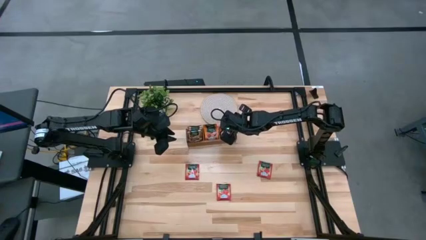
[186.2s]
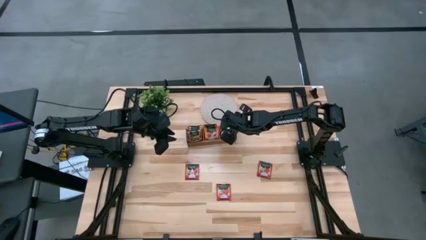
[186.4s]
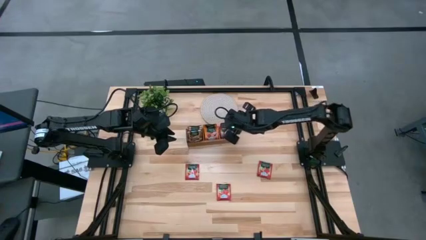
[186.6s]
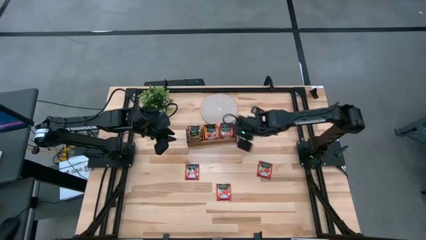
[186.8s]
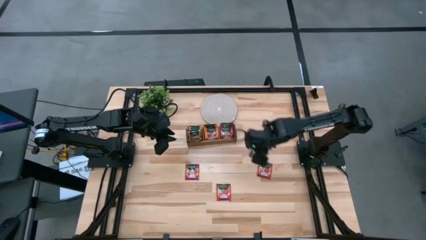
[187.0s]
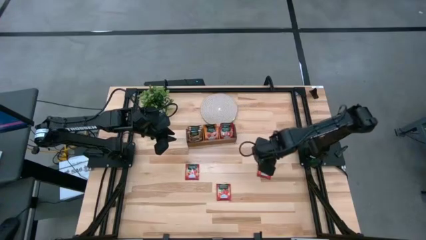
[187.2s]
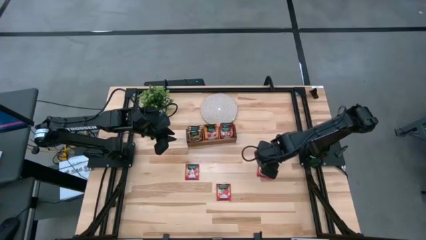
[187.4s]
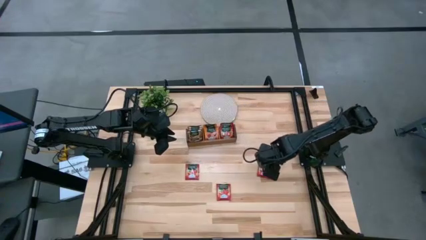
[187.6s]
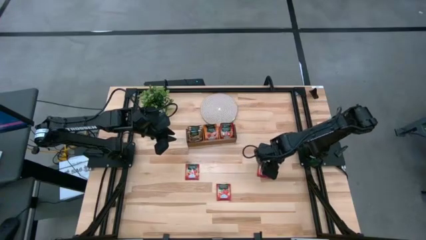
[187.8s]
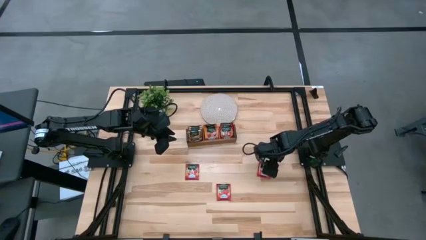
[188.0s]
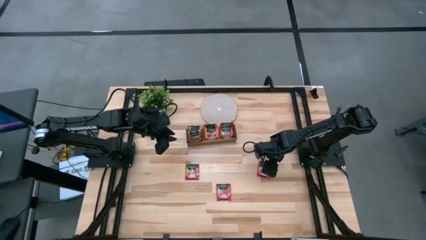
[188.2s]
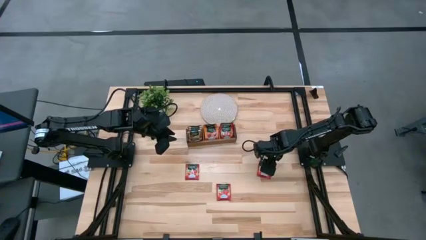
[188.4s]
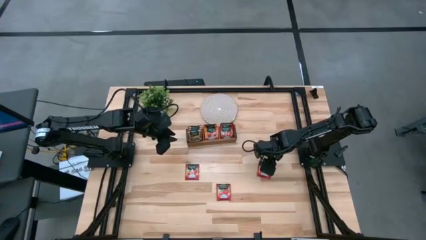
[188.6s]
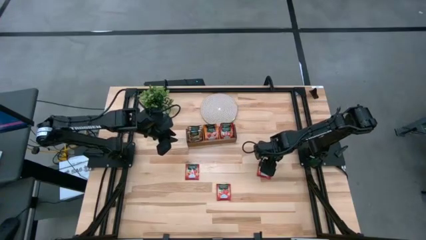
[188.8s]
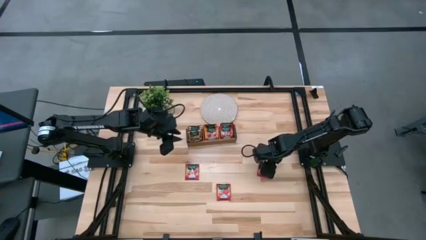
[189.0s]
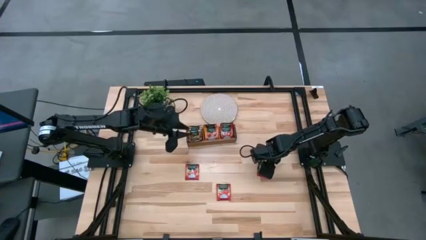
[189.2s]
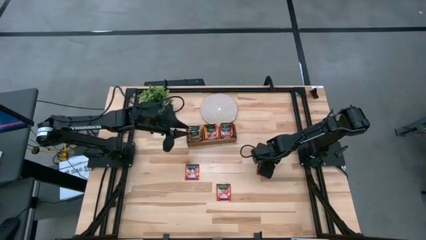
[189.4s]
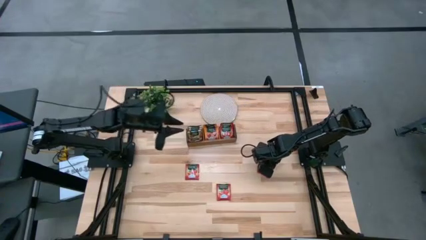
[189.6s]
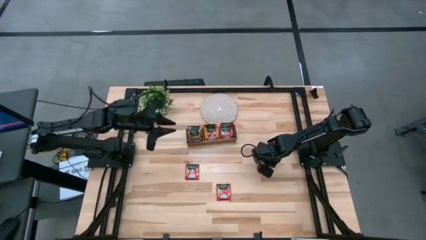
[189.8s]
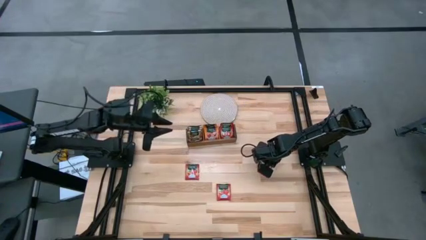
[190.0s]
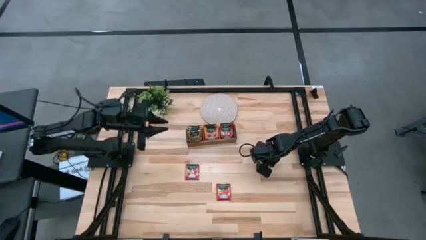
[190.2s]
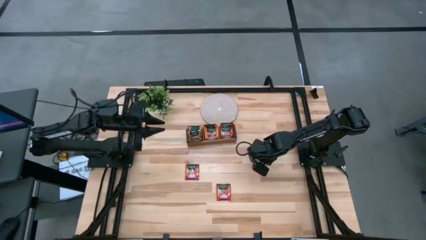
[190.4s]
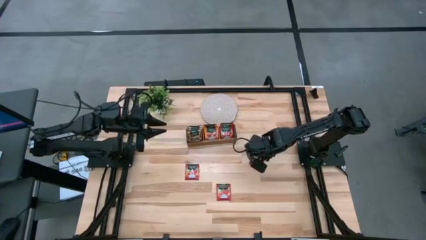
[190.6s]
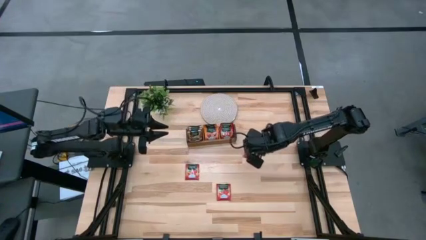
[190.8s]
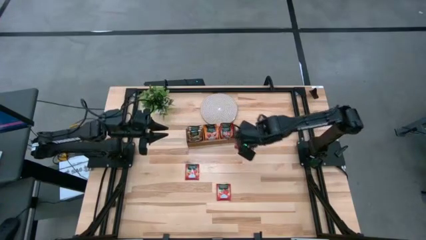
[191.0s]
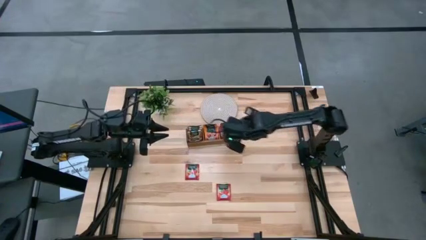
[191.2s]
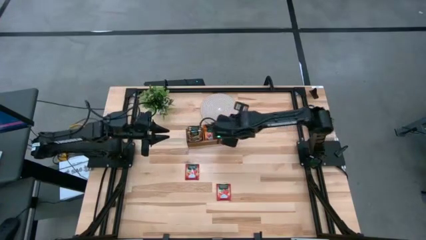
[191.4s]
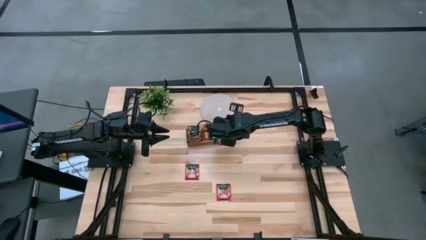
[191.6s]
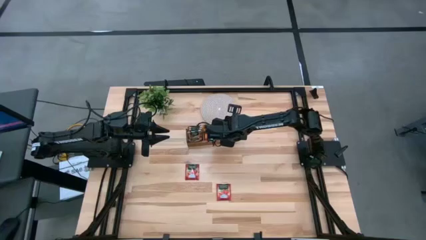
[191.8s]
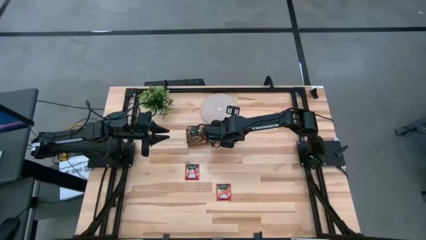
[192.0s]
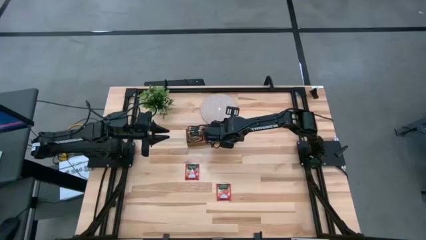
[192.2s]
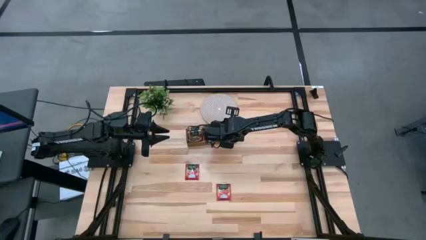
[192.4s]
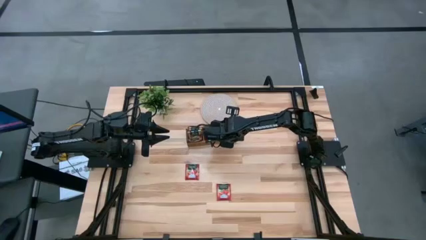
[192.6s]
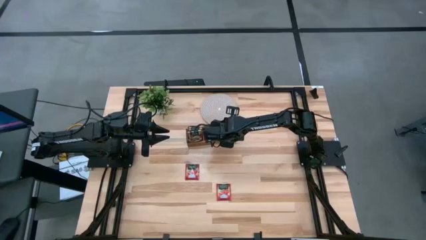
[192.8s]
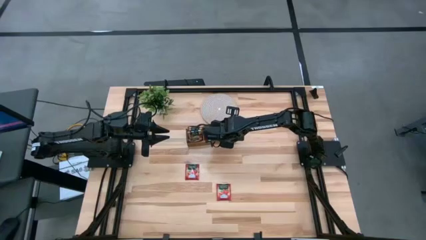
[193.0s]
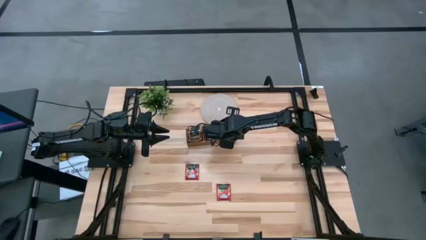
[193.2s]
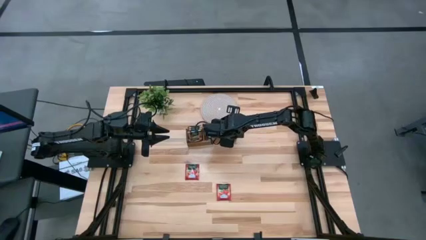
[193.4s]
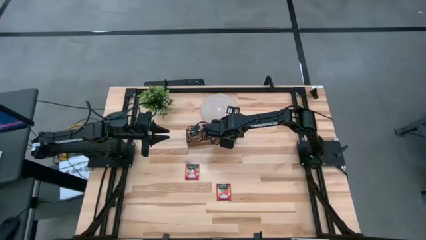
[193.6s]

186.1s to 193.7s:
Task: Pick & Place Tea
Put the red tea bag into the right section of the wooden organizer

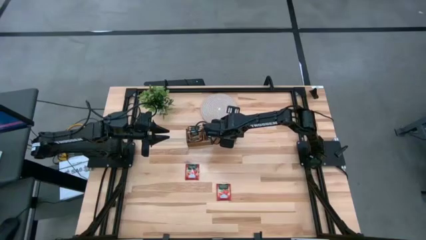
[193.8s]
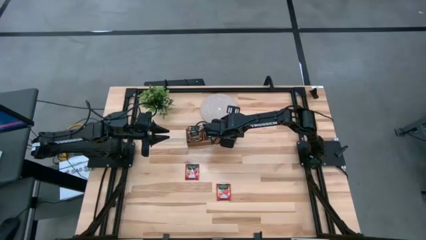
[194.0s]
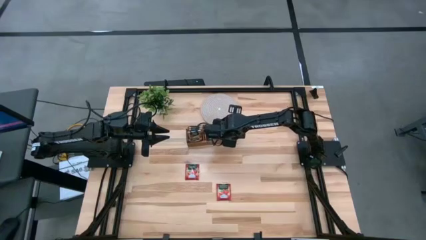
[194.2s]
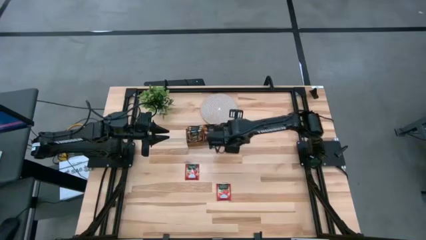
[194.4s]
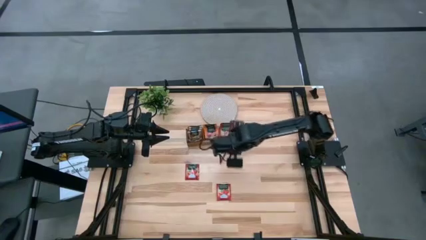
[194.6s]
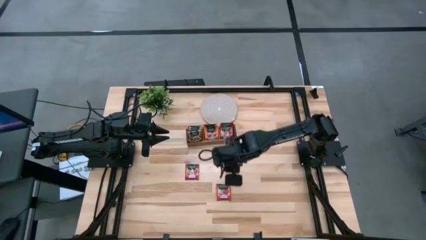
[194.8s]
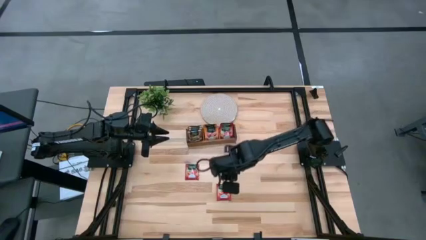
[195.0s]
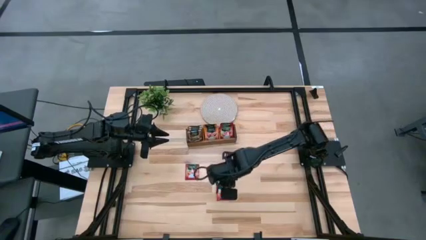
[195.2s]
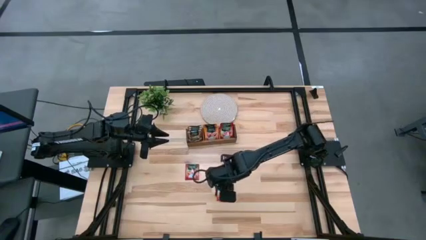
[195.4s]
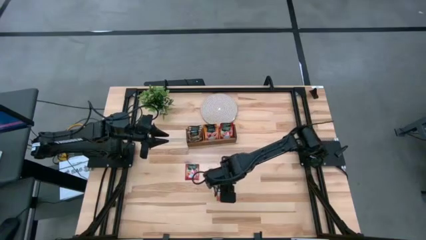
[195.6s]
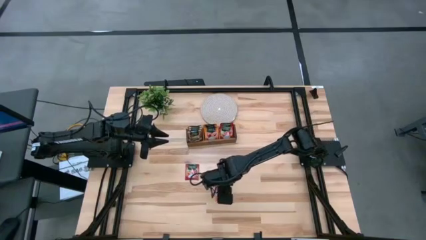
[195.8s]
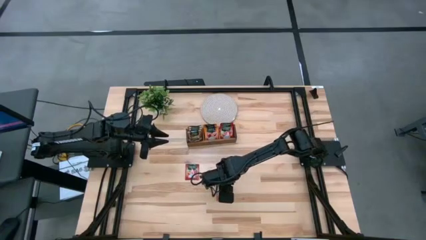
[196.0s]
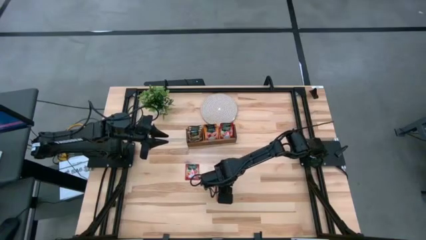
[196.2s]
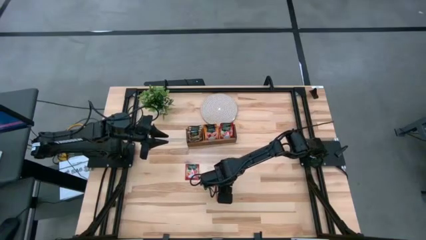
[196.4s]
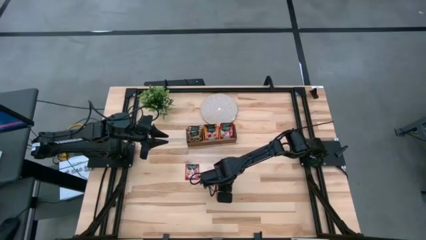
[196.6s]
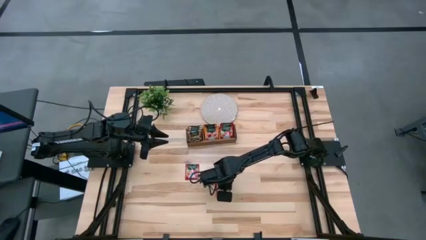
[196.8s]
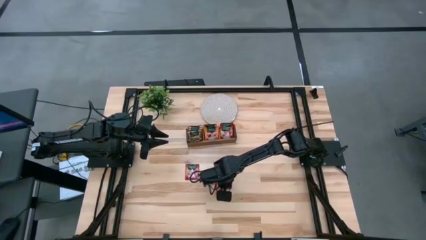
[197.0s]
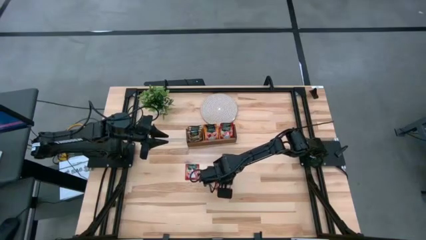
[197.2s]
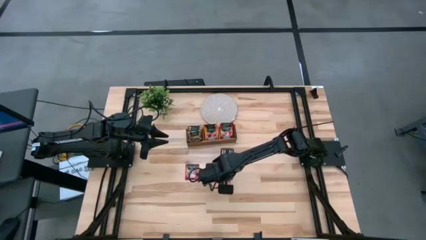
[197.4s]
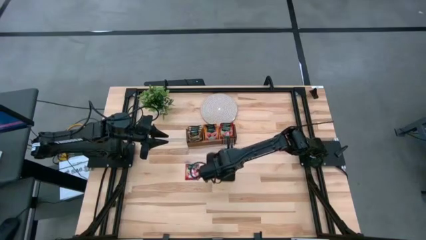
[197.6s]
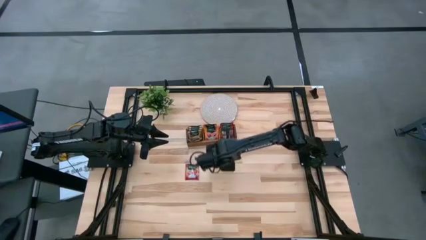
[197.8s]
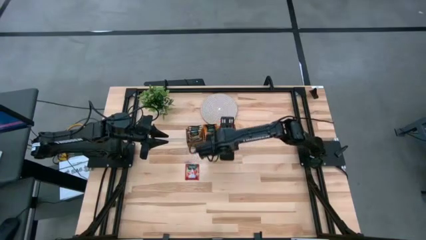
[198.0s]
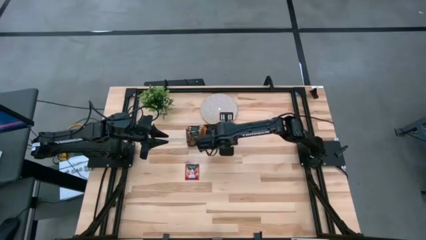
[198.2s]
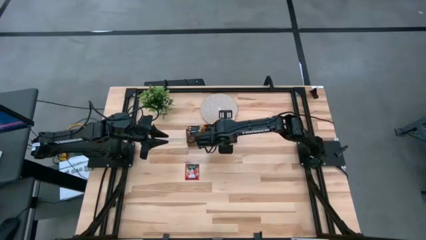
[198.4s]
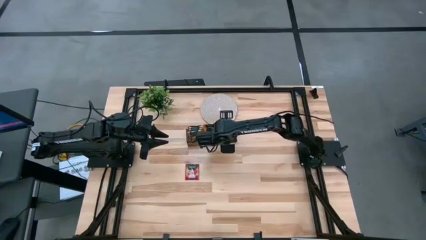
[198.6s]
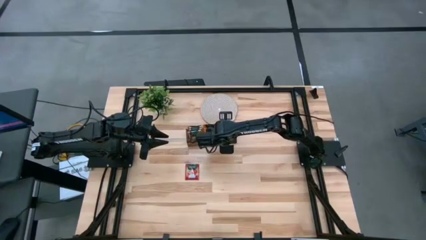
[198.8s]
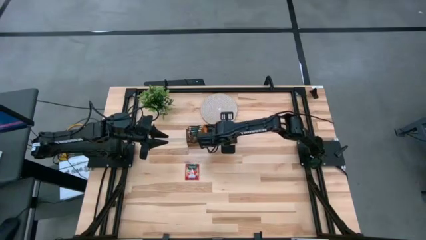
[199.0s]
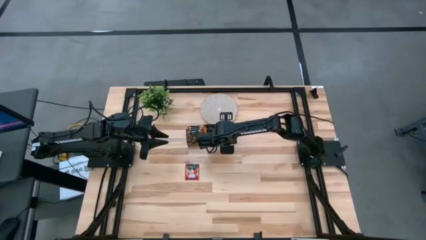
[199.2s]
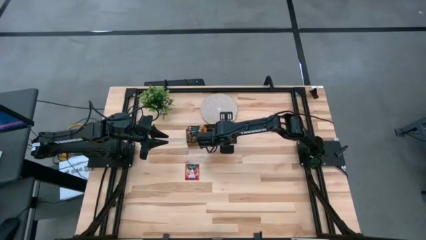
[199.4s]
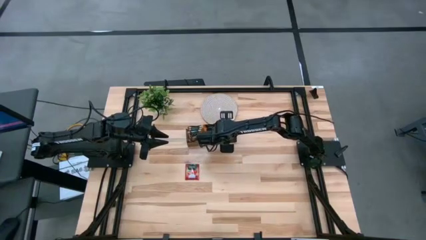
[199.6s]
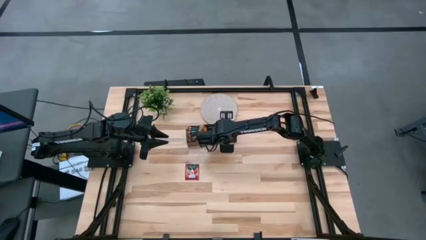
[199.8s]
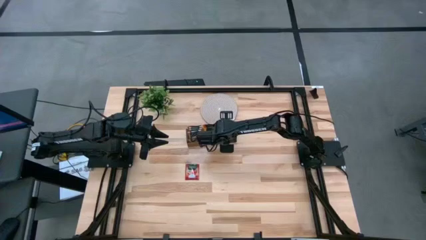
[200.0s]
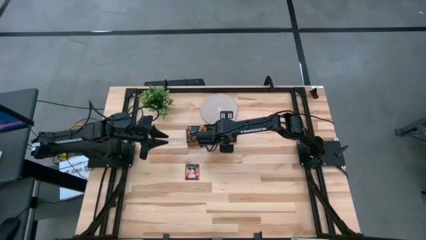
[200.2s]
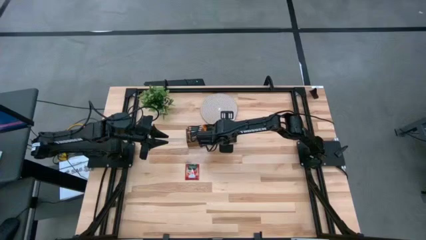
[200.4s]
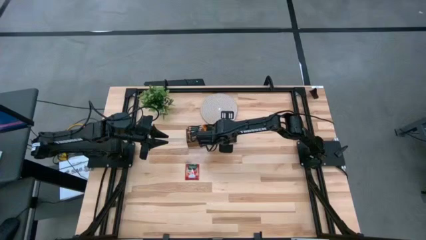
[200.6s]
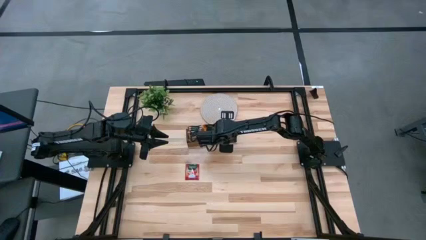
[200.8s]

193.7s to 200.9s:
Put the red tea bag into the right section of the wooden organizer
